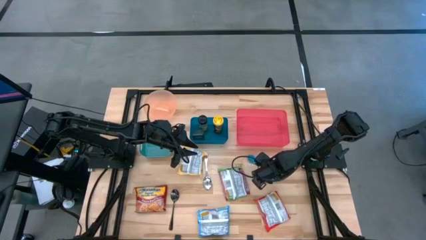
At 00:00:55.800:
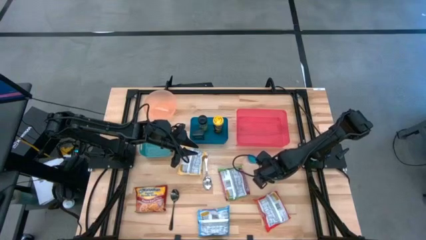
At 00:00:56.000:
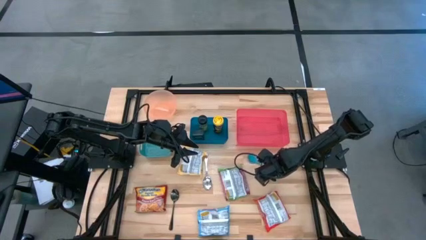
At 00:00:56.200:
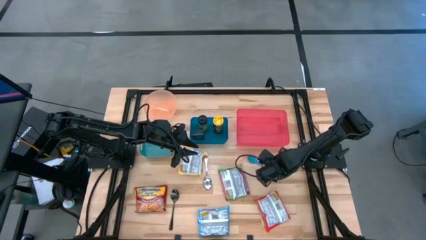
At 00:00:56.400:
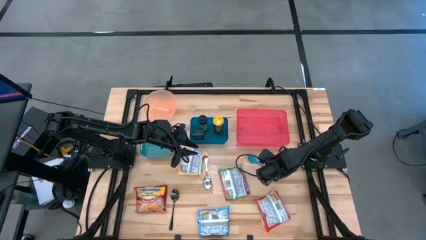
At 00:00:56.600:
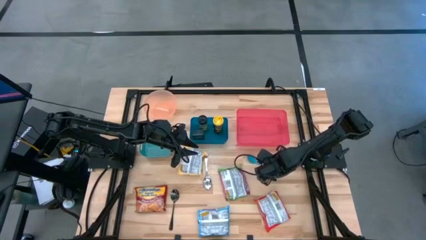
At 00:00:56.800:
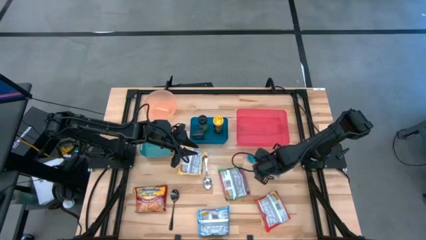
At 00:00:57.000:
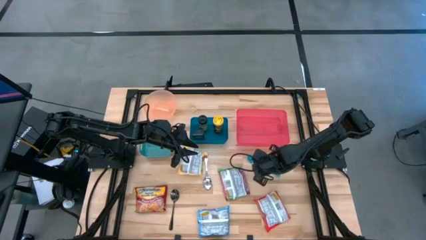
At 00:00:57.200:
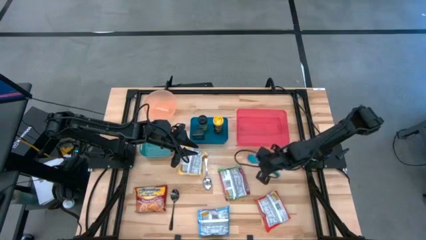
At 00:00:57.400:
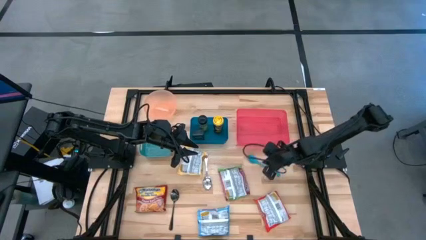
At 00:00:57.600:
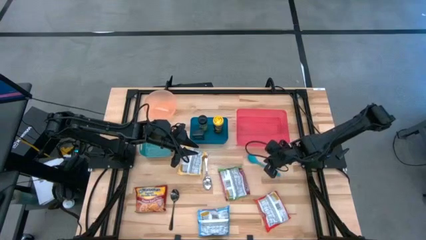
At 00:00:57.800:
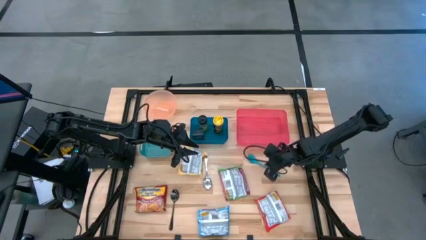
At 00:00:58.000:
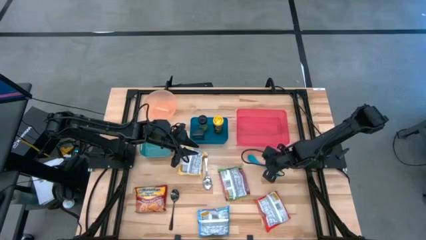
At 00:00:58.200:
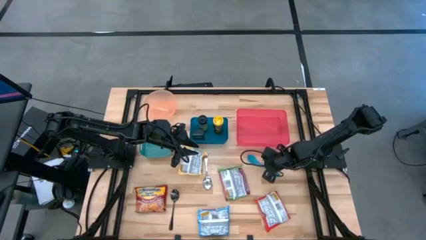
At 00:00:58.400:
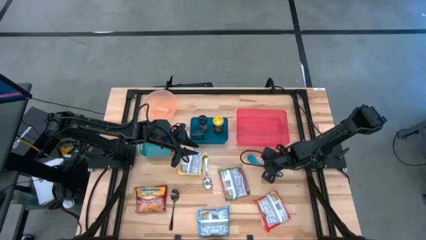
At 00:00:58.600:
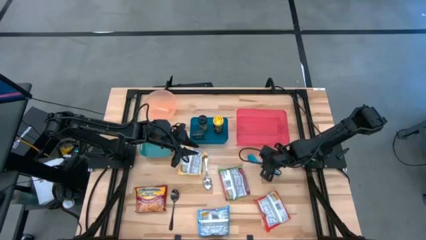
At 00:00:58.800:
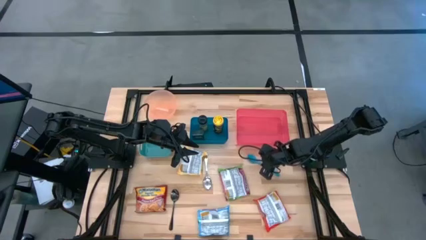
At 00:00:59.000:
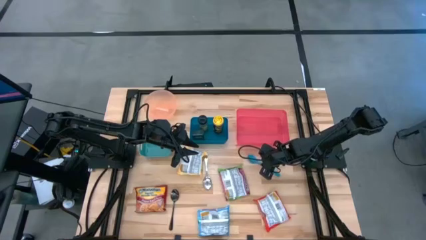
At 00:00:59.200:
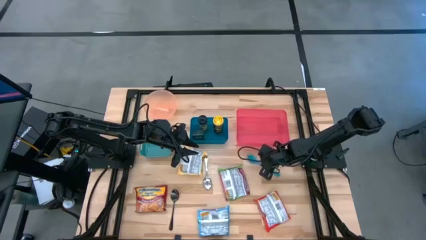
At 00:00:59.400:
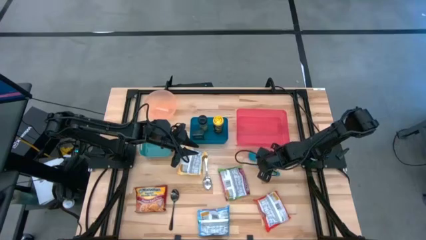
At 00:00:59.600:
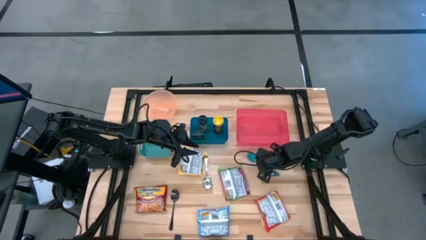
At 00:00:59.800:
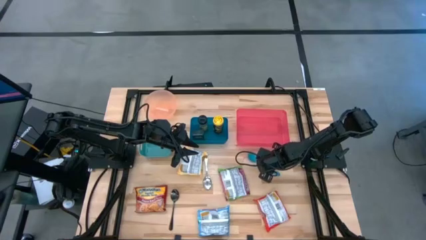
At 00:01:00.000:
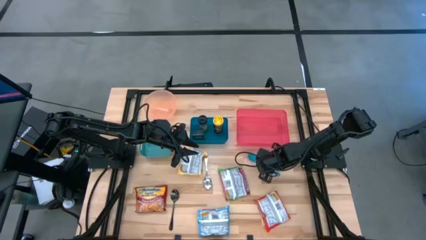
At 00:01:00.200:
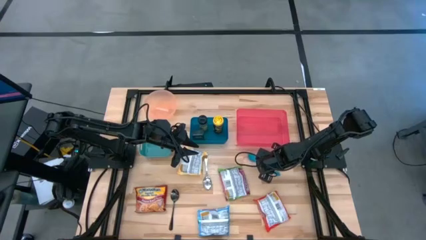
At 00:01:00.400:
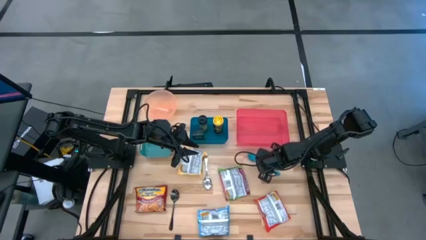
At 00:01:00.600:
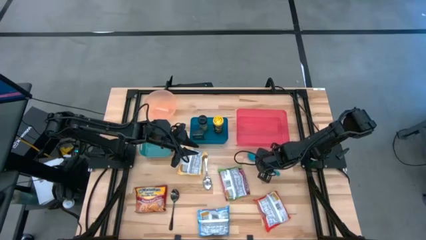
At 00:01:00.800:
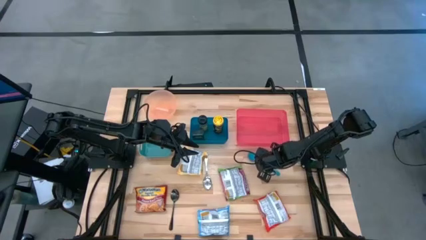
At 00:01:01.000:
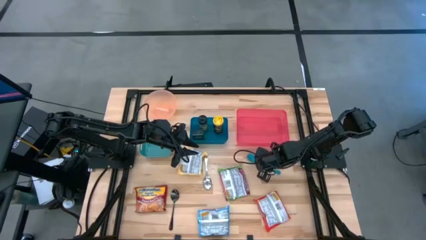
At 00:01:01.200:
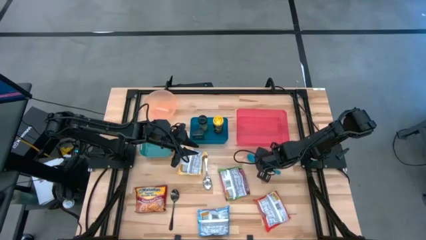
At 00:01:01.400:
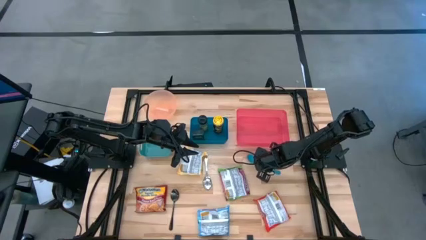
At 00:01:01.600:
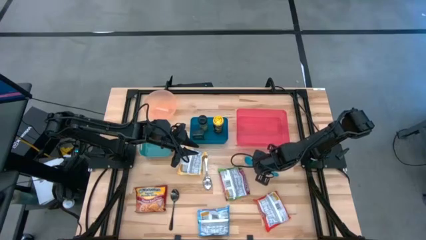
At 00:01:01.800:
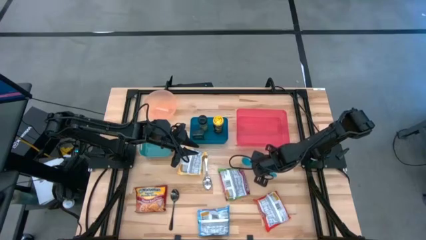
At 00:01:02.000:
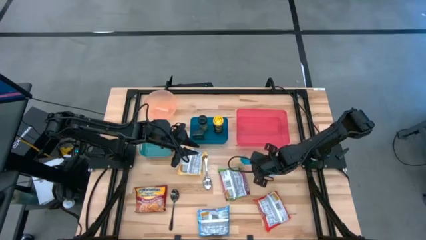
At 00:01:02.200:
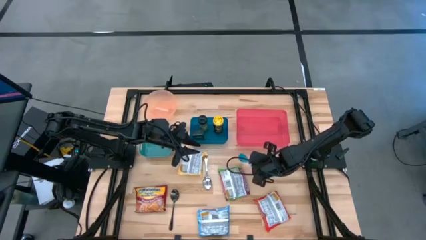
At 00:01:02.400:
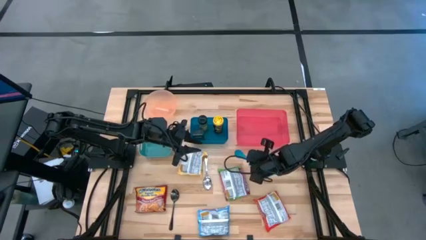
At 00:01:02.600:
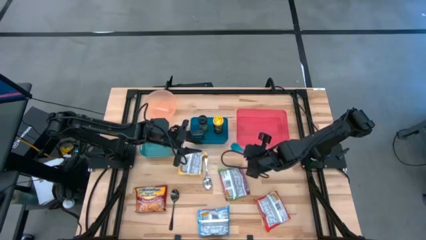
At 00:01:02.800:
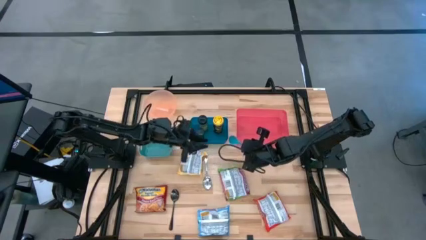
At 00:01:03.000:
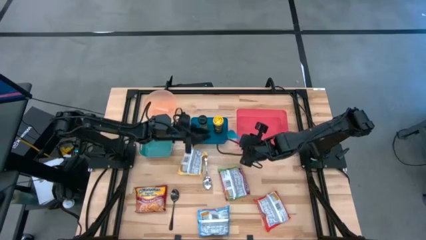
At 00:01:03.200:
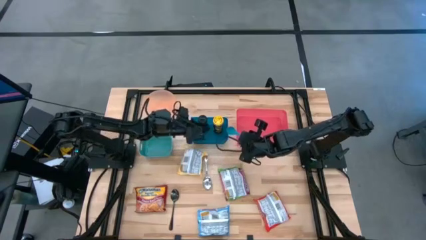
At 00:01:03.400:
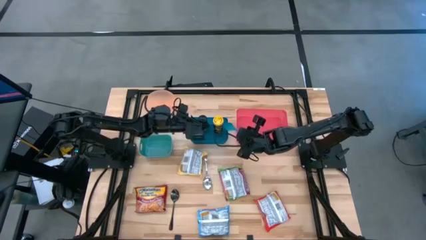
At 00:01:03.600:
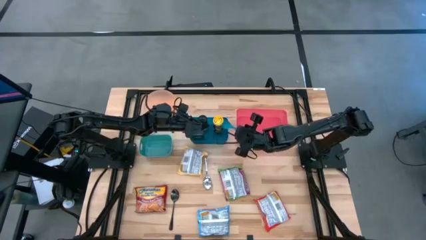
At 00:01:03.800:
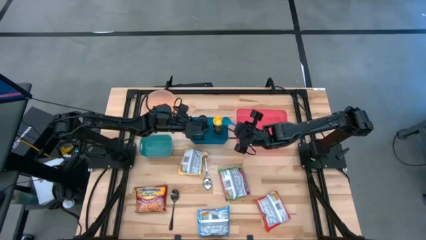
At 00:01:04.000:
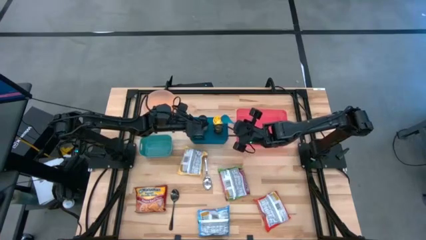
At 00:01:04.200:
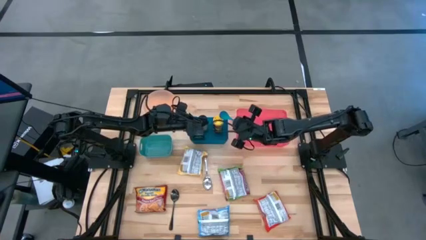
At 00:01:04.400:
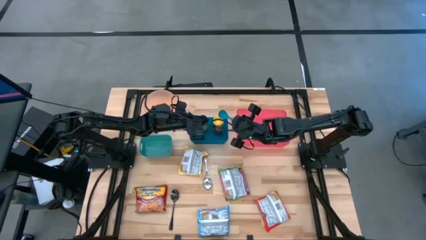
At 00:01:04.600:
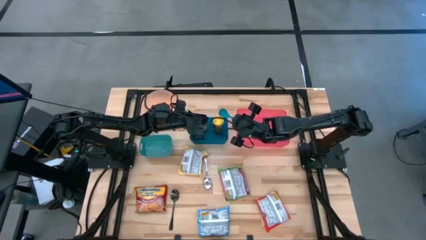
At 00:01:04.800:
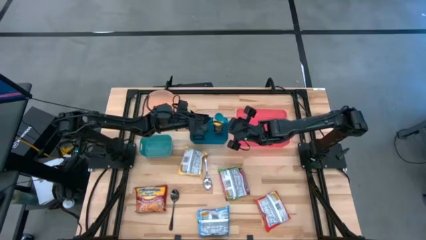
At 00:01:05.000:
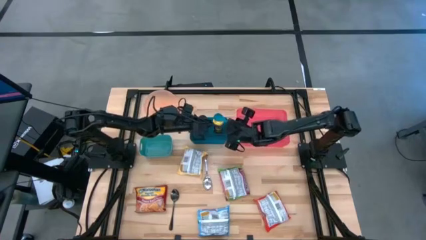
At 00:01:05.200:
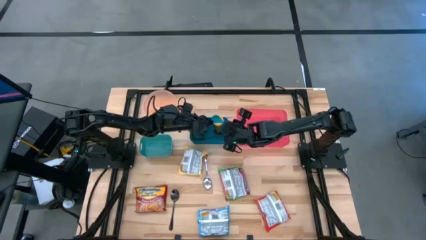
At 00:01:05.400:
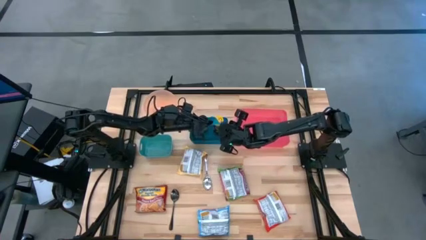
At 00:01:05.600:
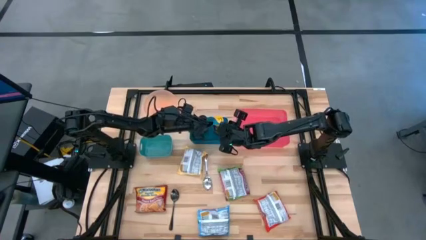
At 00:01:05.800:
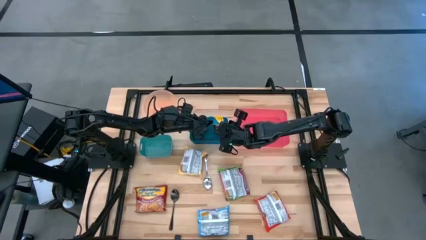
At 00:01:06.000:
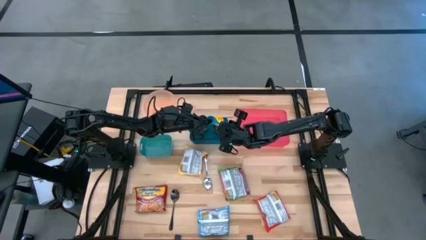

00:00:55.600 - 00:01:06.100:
Task: Pick & Place Food Item
Put the blue spoon into the green bin

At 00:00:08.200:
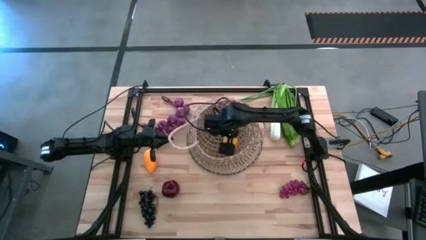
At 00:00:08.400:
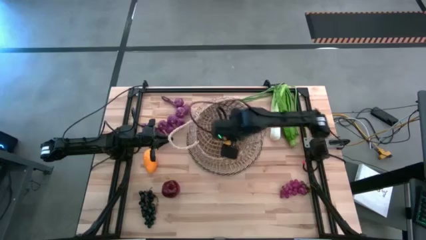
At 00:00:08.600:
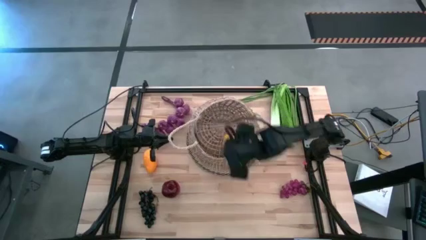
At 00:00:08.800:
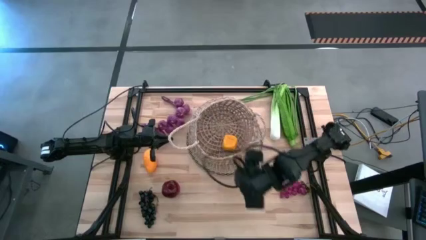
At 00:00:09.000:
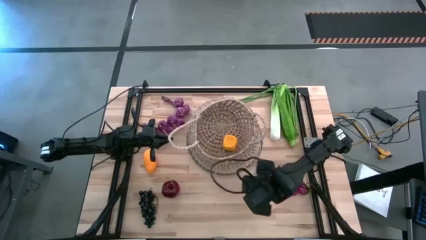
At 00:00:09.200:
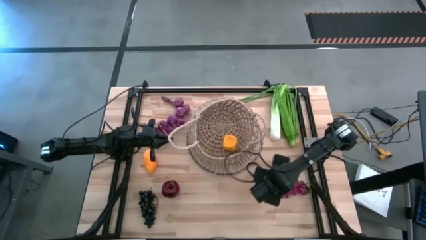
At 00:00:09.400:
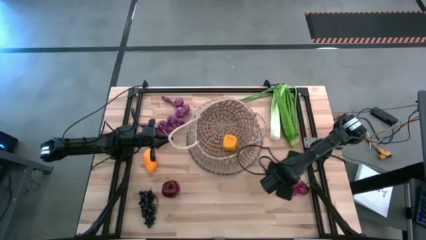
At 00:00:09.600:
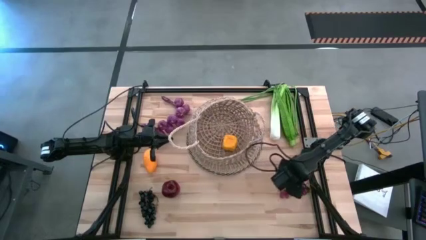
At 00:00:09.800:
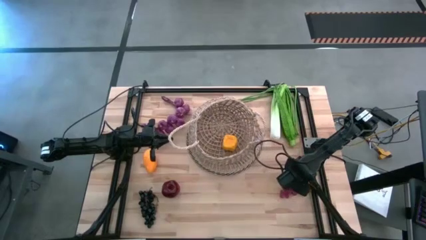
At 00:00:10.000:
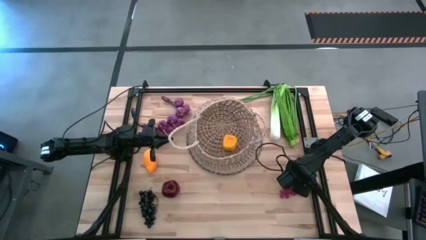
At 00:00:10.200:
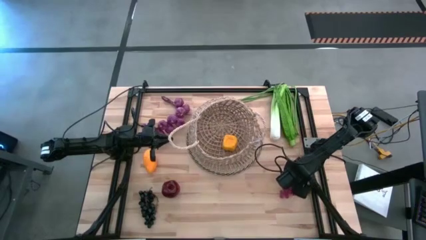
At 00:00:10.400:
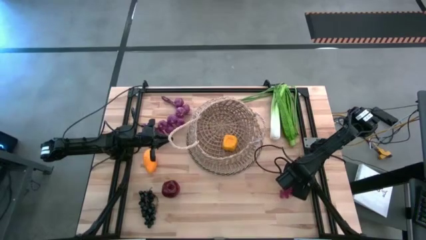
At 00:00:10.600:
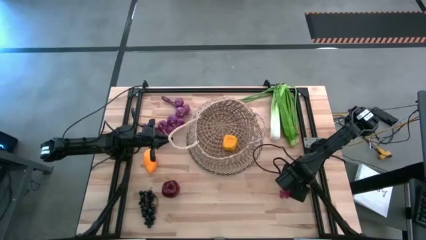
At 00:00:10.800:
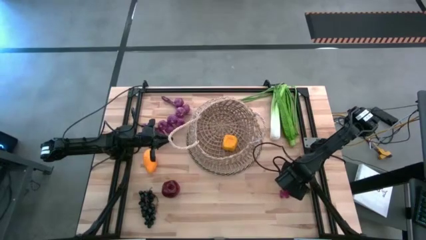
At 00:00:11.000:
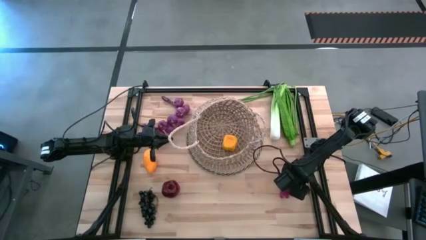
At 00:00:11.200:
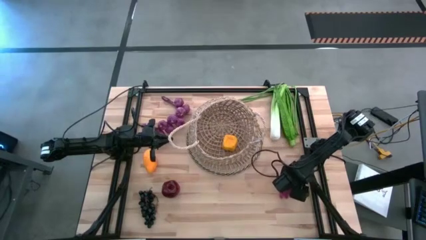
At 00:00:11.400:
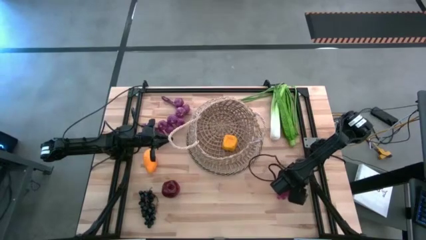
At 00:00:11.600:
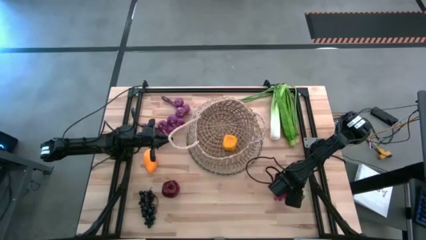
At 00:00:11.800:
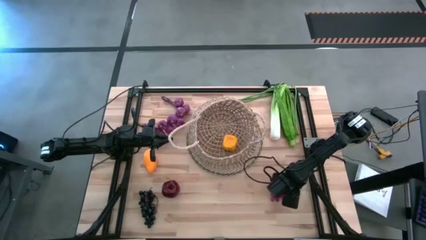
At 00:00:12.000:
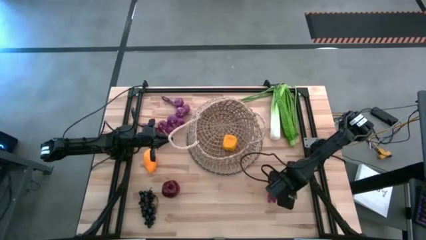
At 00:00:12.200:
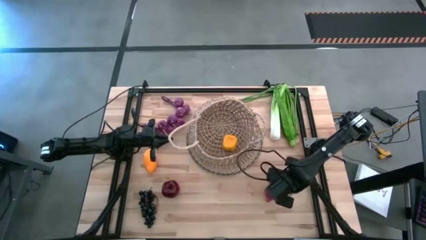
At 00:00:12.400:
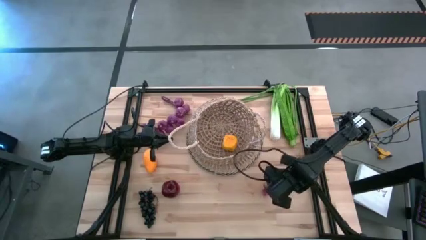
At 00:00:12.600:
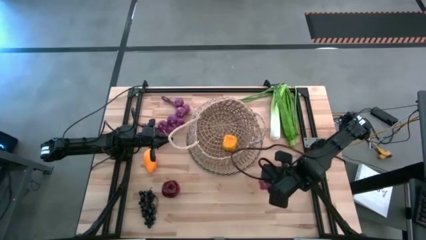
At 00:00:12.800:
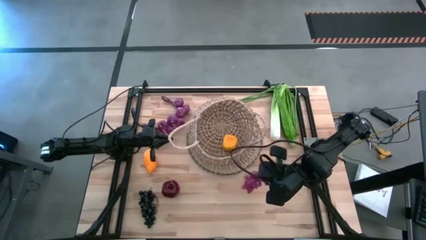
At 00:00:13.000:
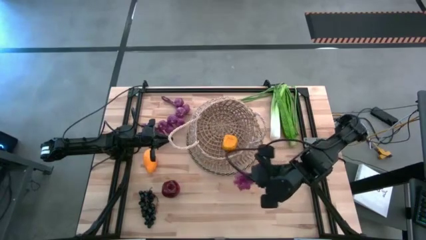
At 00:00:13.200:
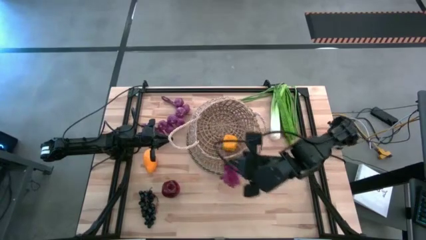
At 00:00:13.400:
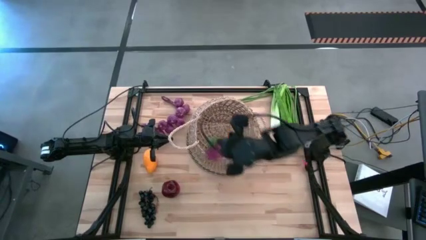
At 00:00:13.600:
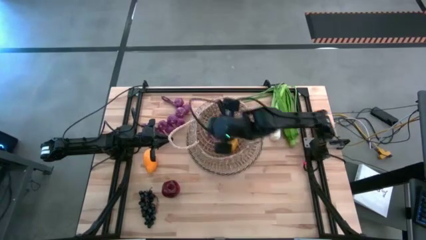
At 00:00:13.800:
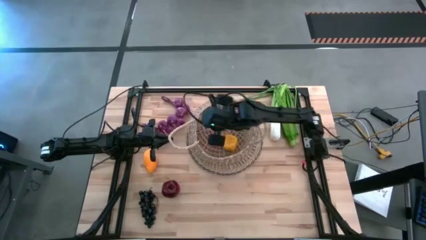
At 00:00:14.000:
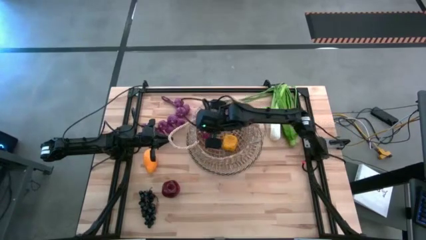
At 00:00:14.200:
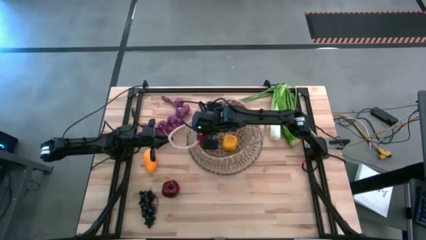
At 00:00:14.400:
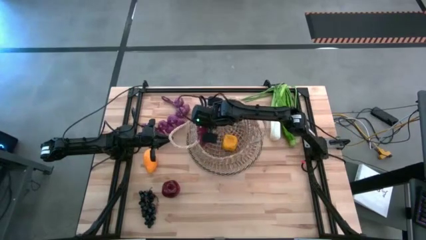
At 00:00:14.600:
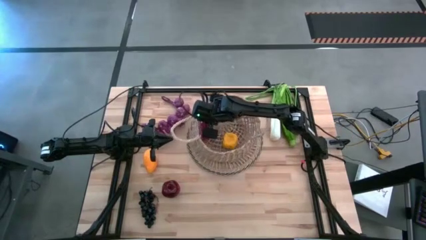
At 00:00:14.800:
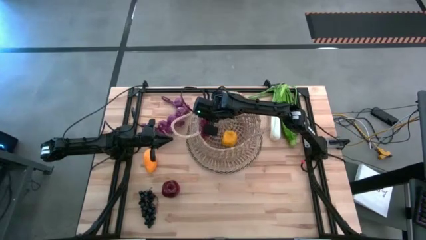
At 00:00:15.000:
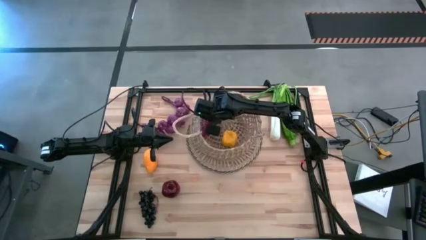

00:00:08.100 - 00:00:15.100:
Task: Build produce basket
Put the purple grapes into the basket
